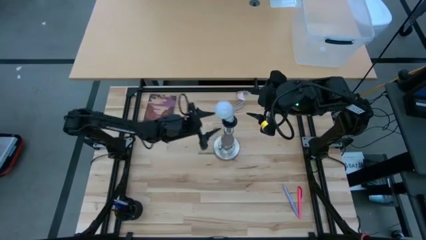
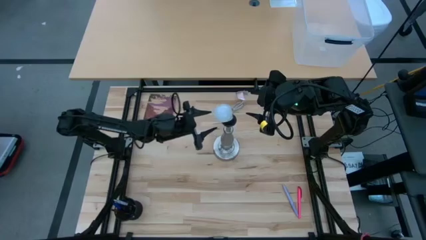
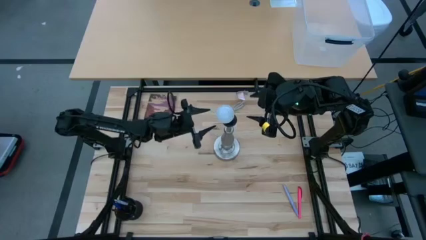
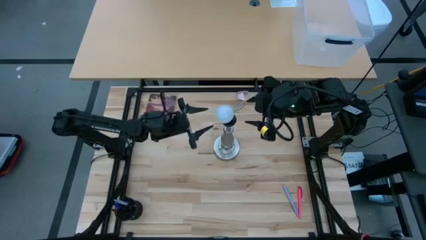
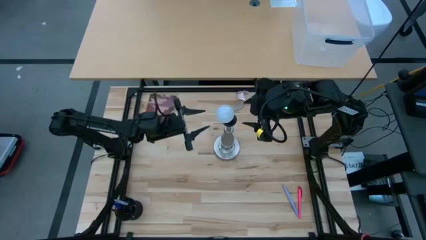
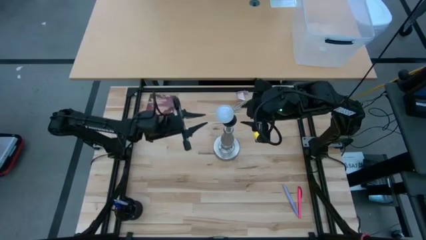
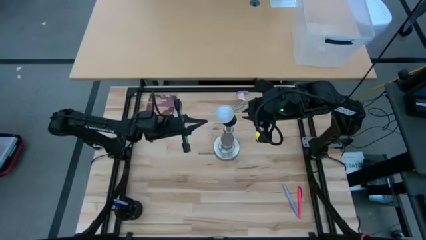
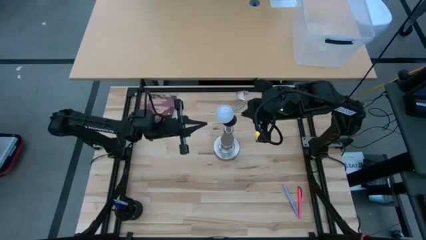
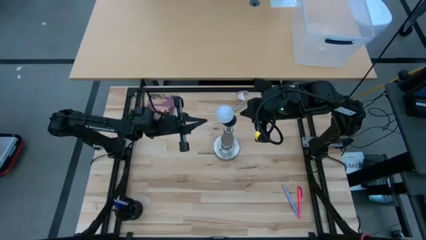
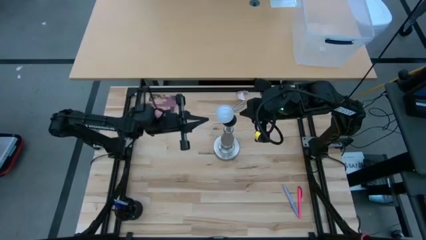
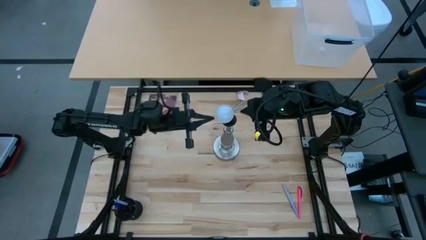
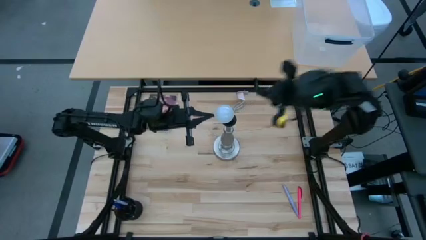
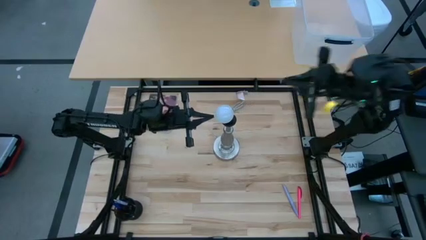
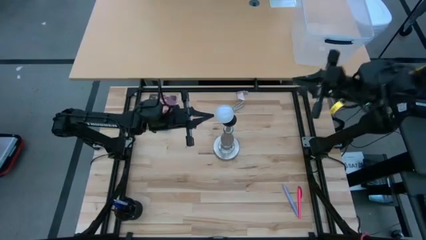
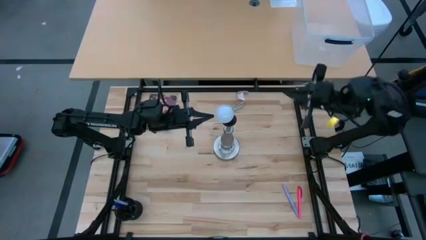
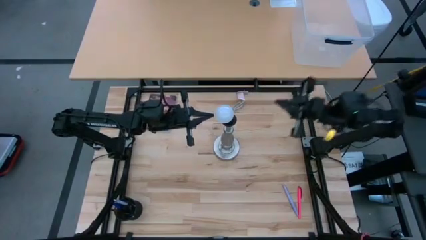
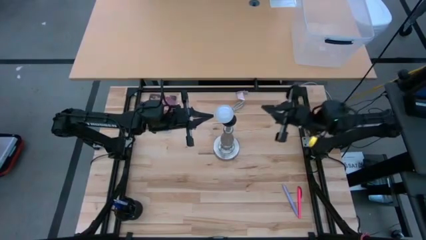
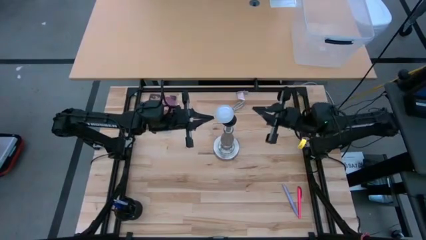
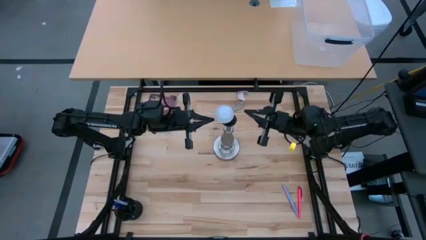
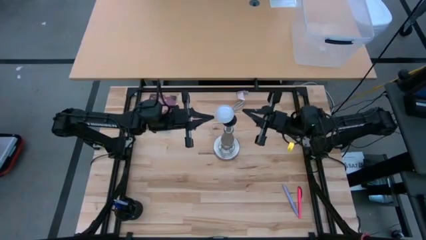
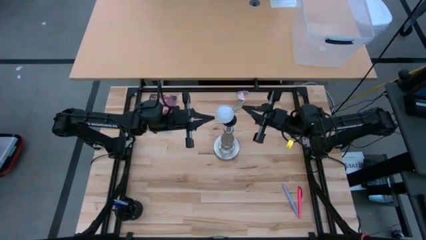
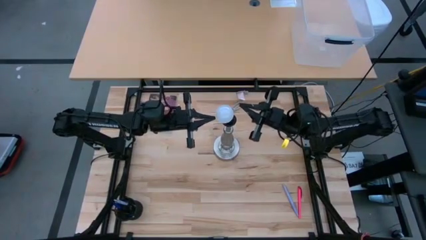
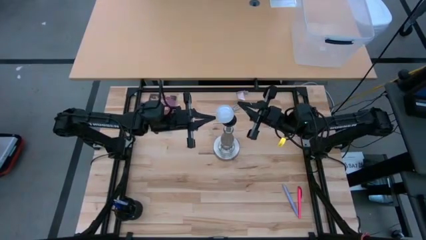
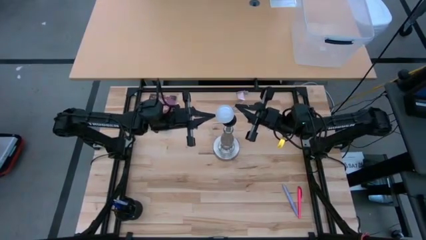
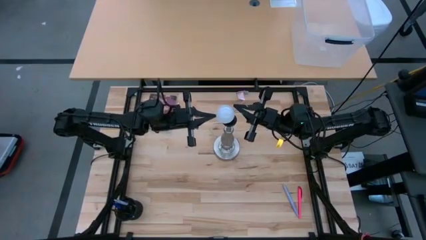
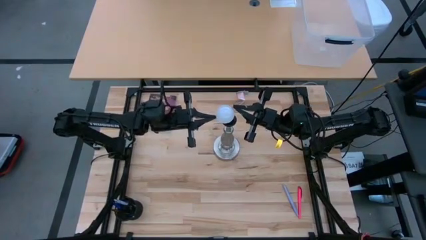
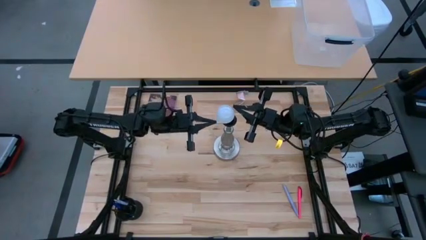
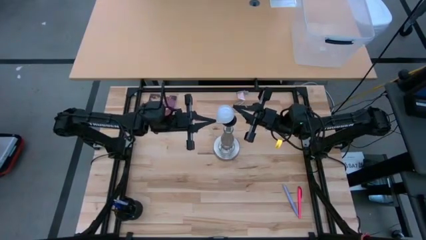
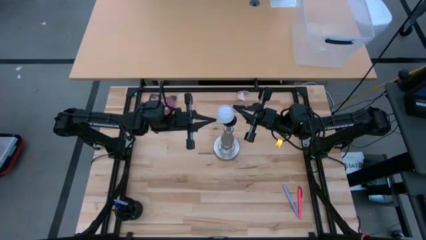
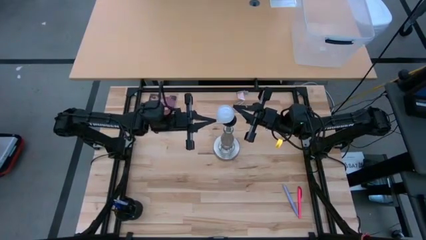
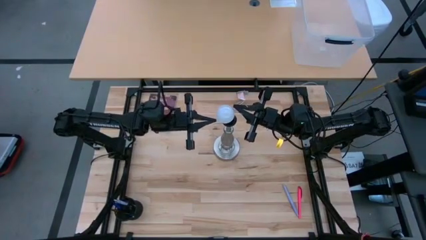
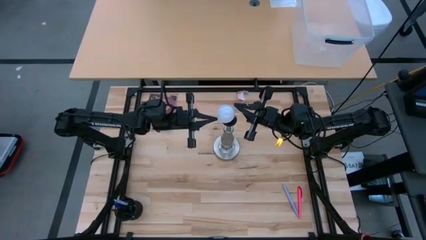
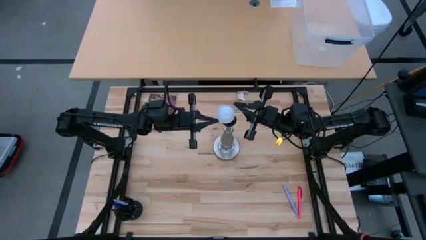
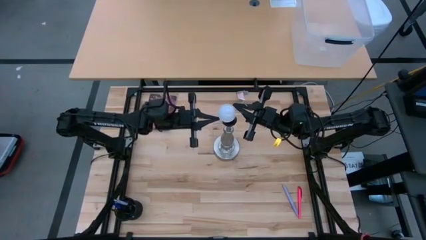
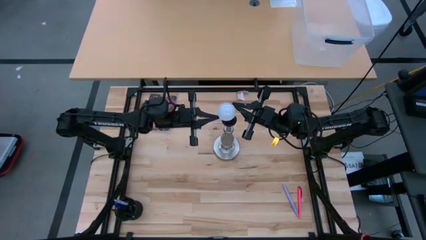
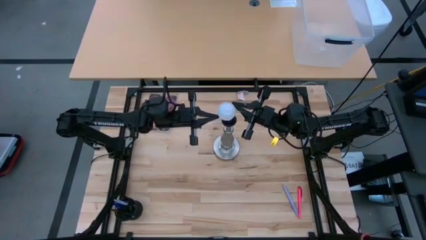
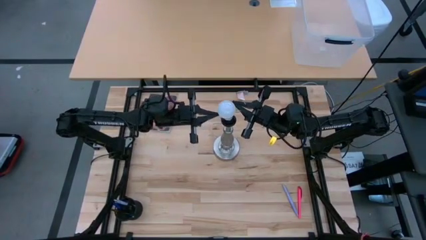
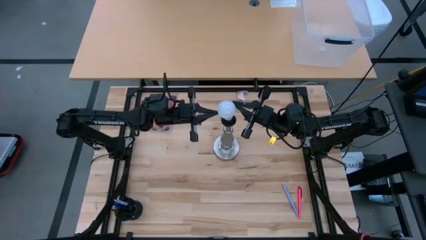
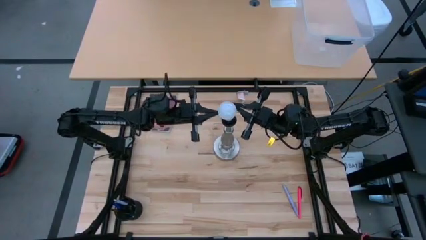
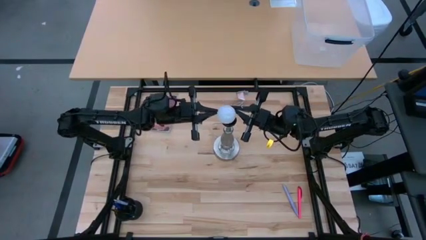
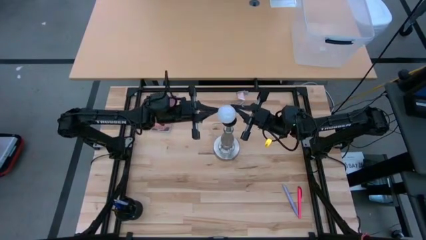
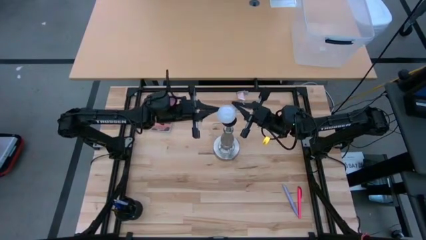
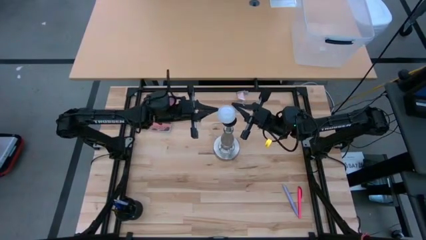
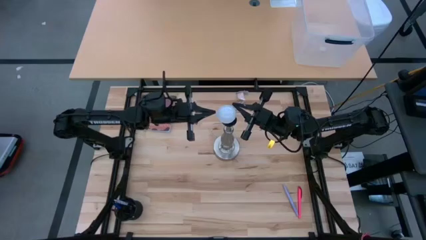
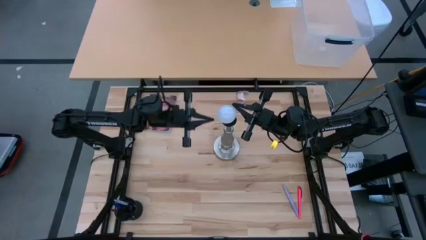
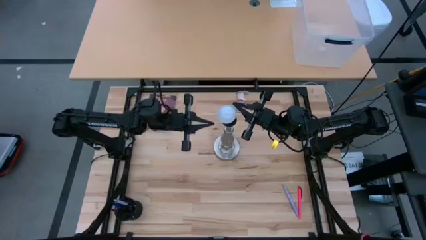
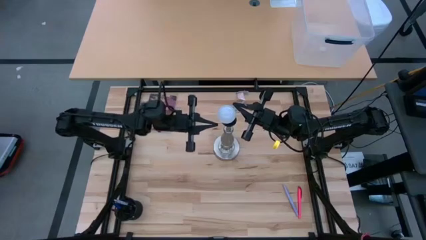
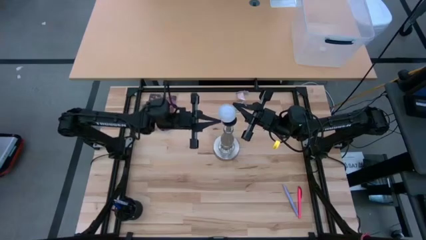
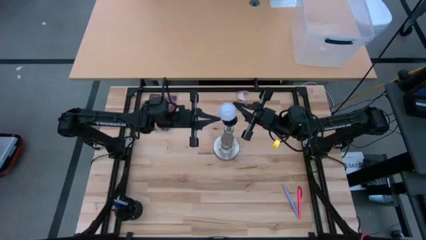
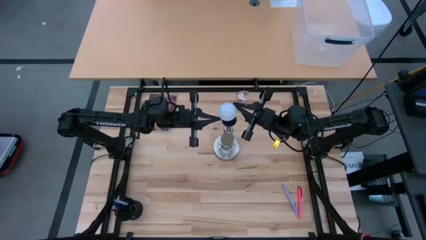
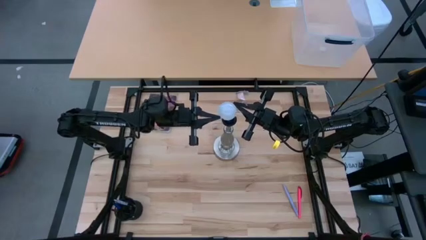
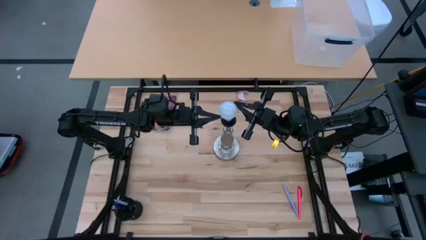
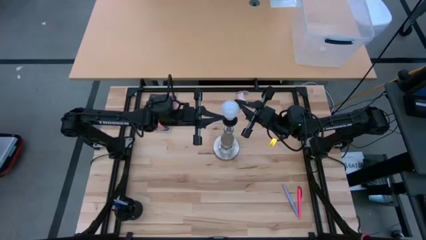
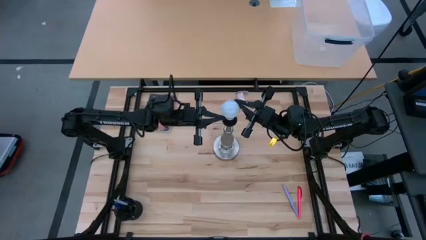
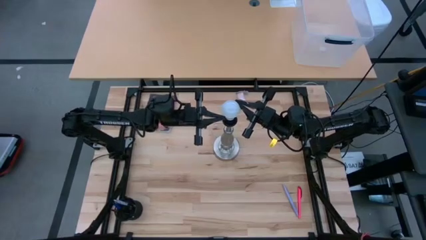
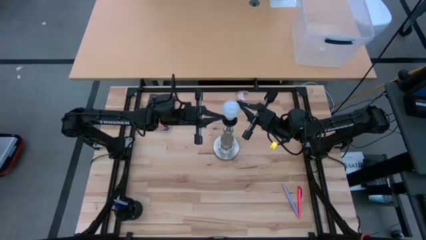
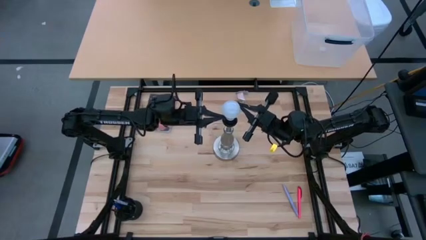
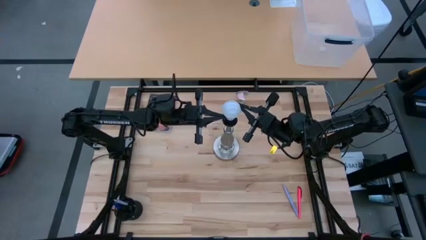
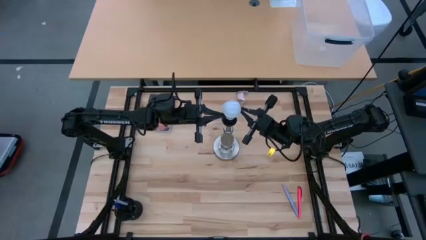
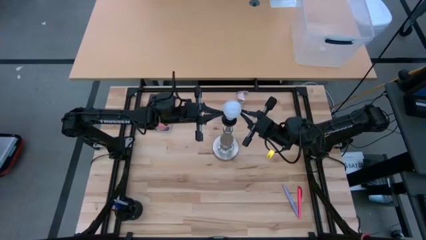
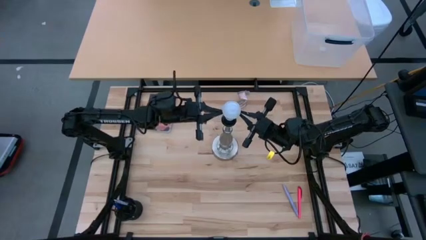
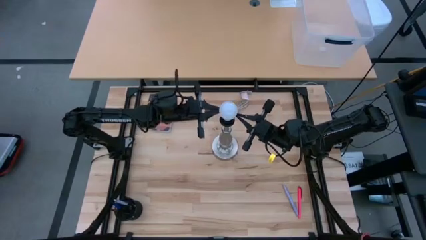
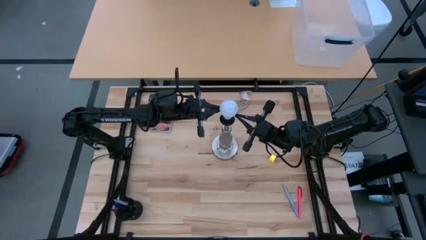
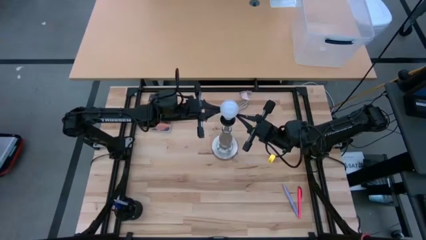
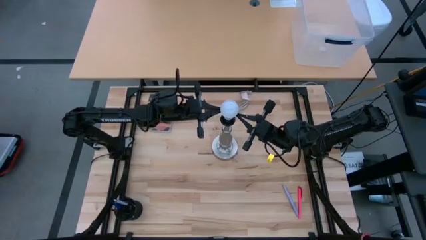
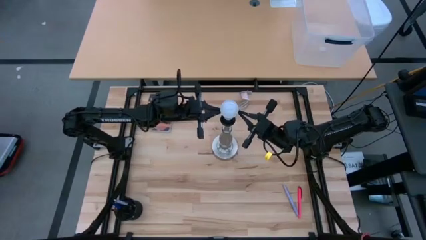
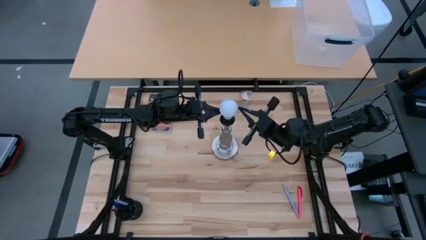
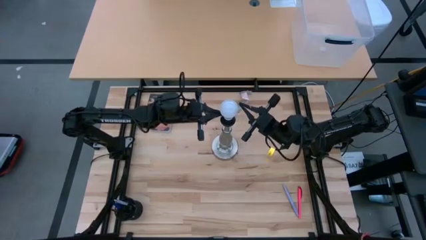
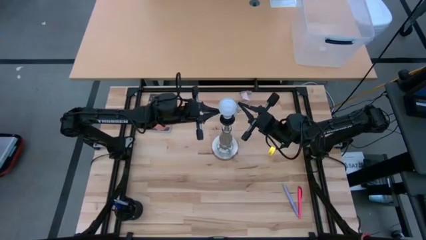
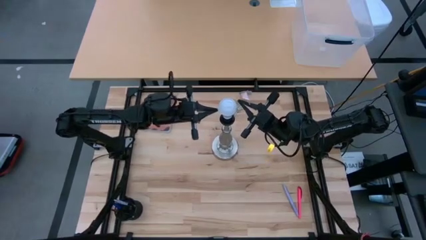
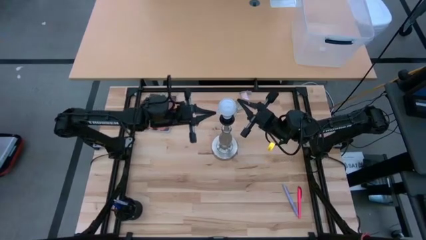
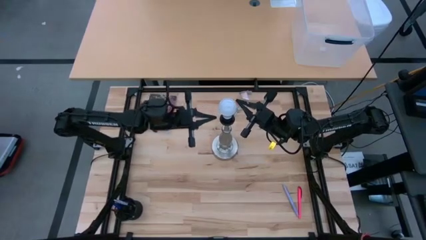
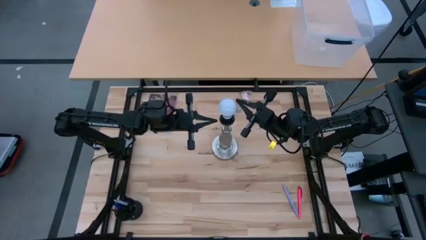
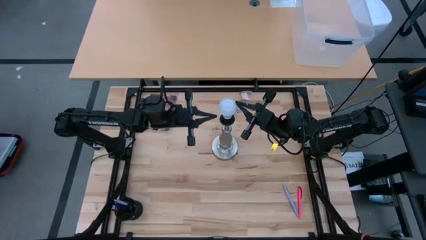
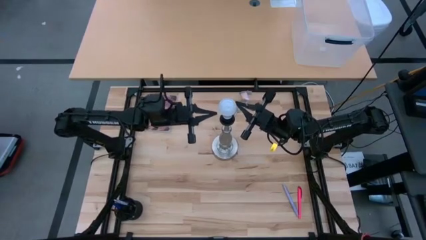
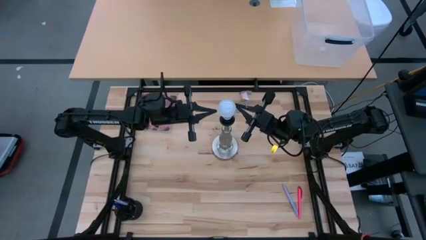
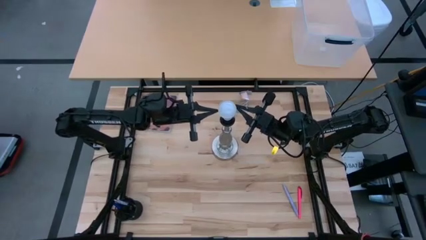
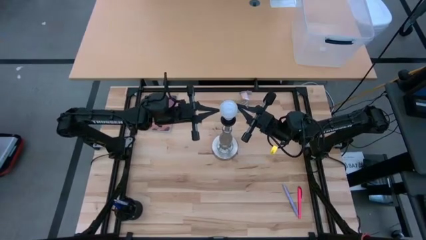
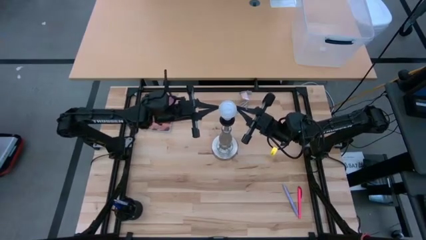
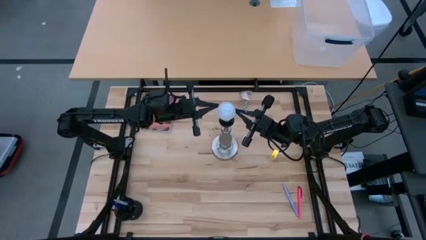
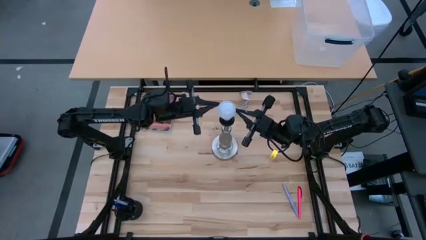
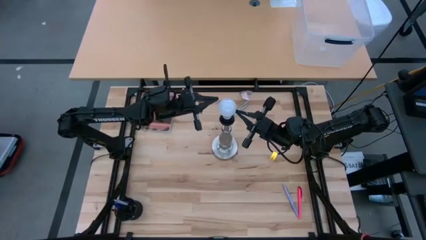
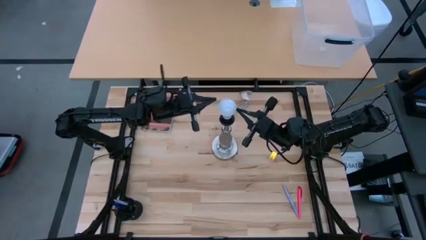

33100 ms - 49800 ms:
Task: Screw lightbulb
Insert the lightbulb into the silver lamp
